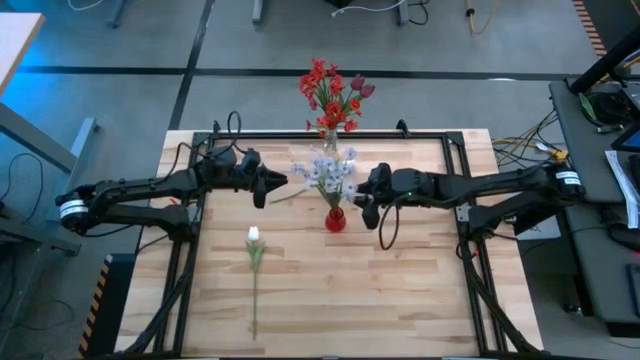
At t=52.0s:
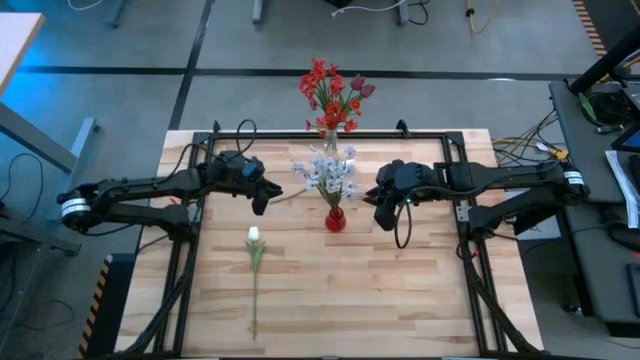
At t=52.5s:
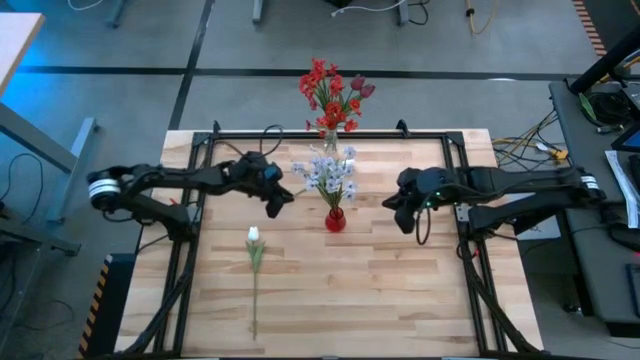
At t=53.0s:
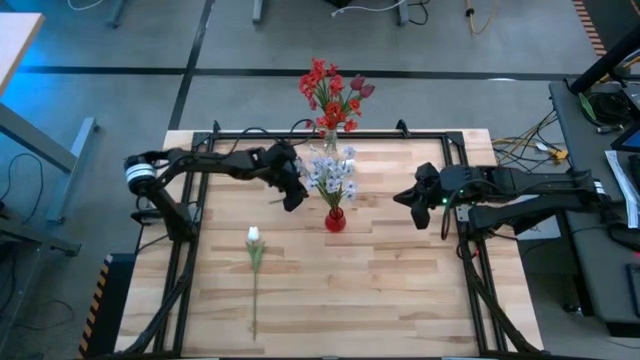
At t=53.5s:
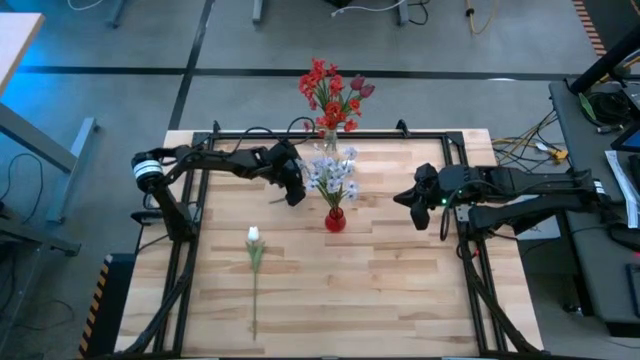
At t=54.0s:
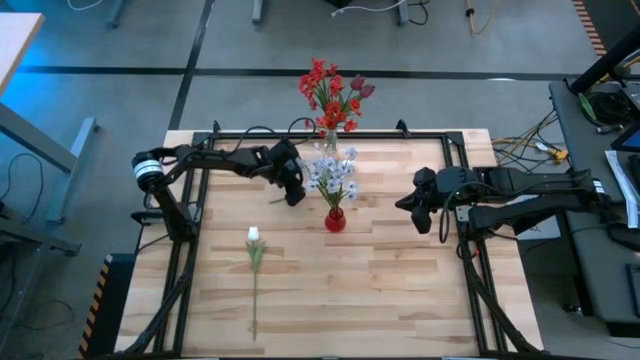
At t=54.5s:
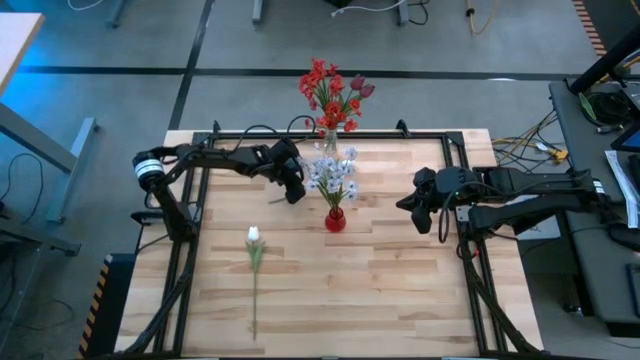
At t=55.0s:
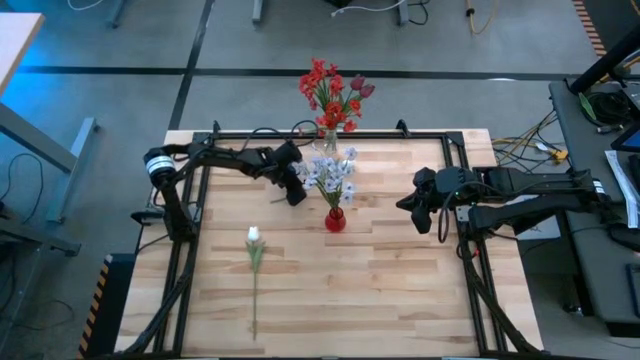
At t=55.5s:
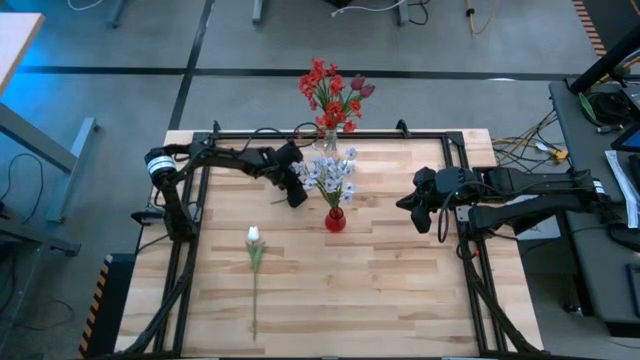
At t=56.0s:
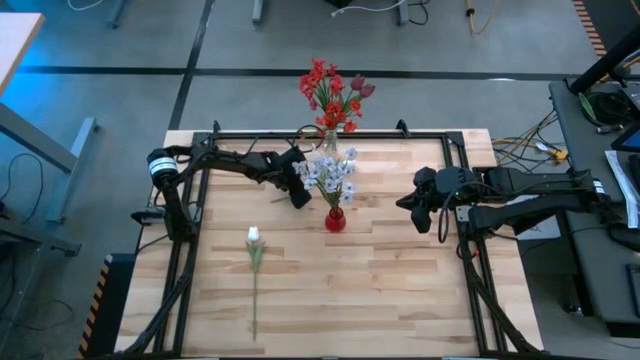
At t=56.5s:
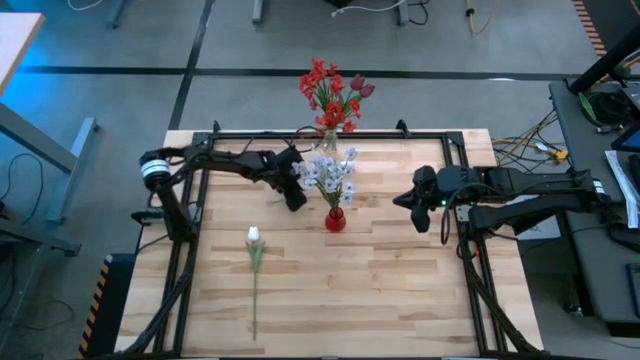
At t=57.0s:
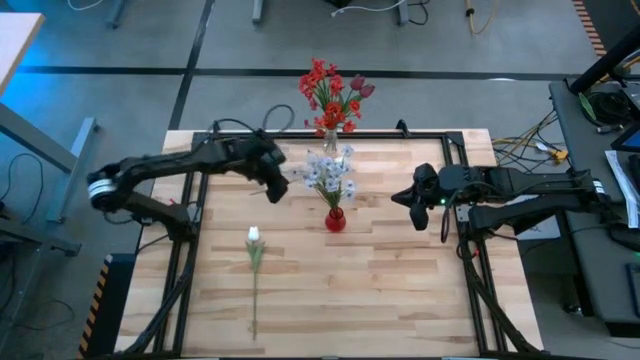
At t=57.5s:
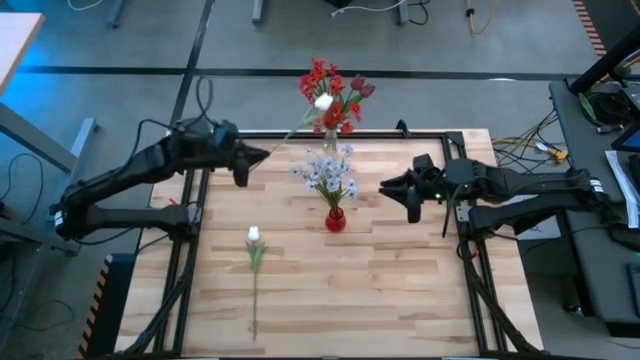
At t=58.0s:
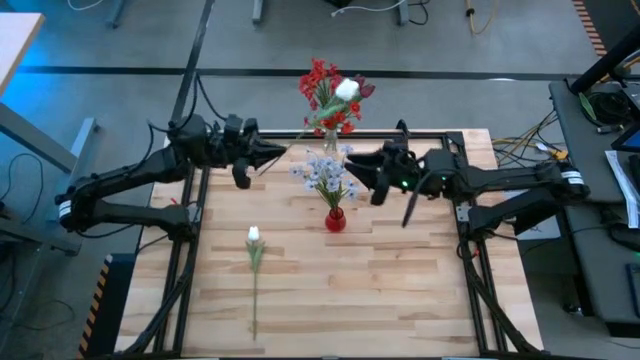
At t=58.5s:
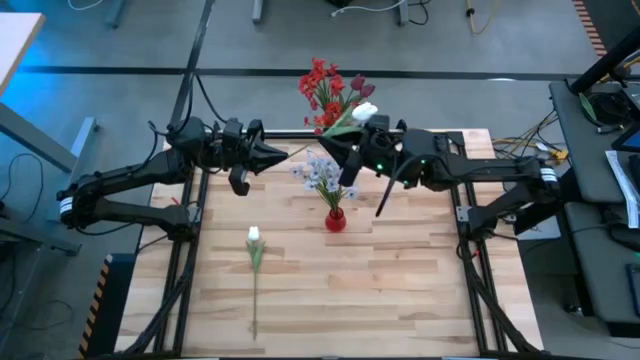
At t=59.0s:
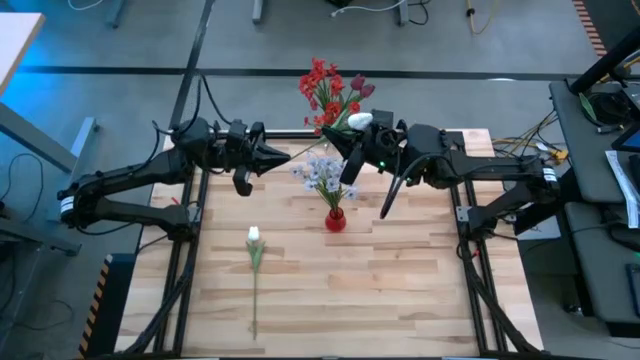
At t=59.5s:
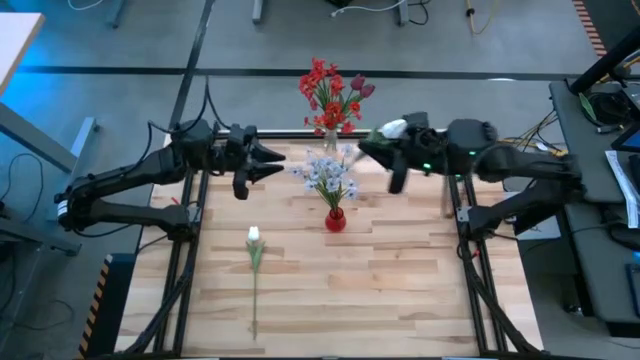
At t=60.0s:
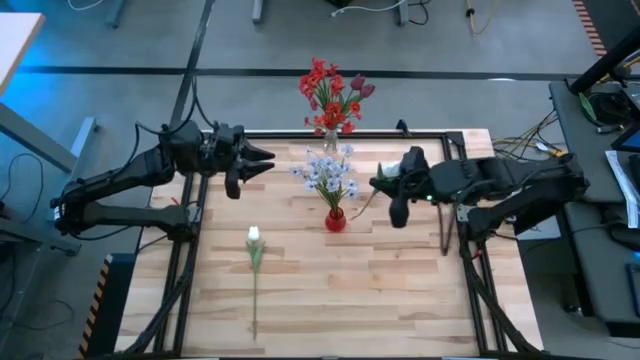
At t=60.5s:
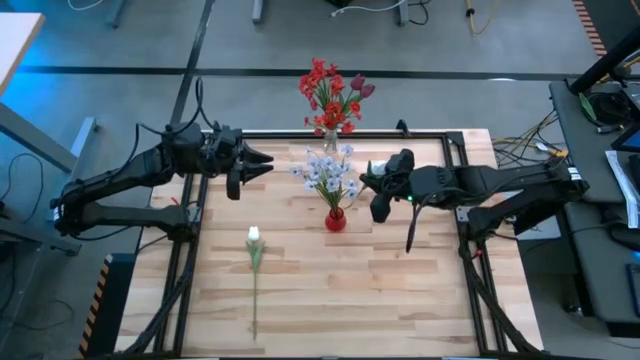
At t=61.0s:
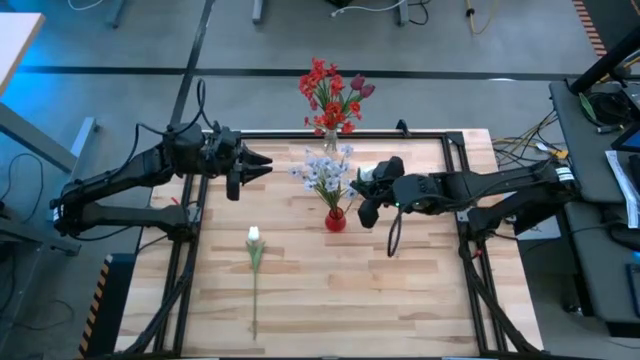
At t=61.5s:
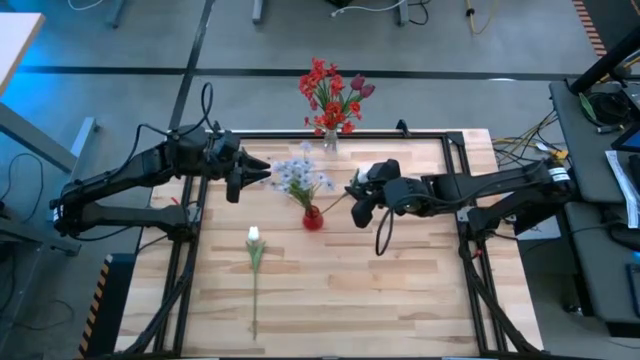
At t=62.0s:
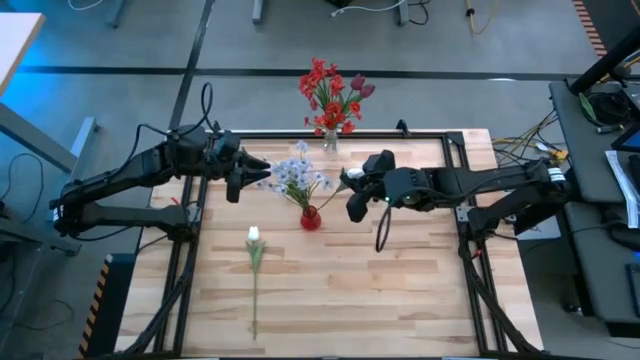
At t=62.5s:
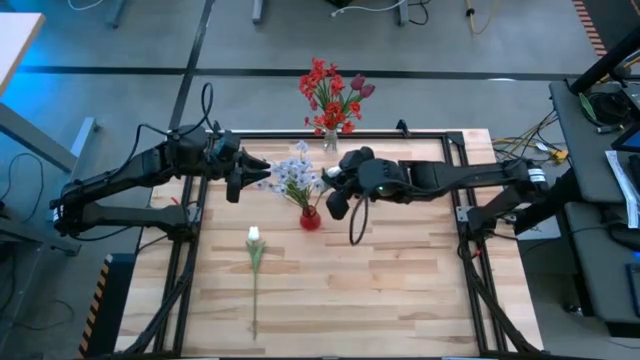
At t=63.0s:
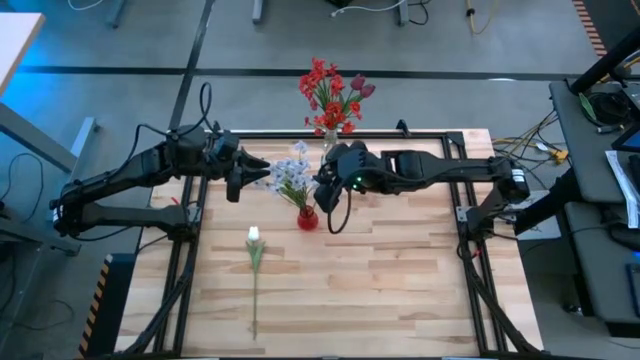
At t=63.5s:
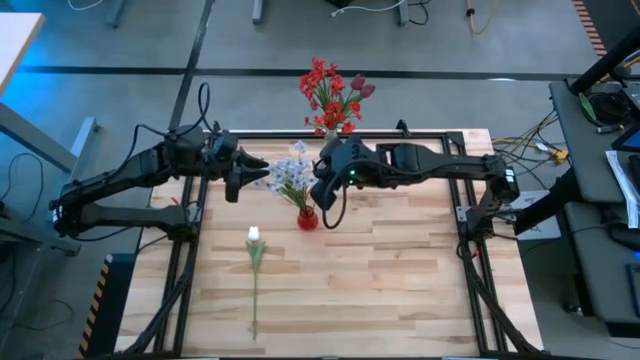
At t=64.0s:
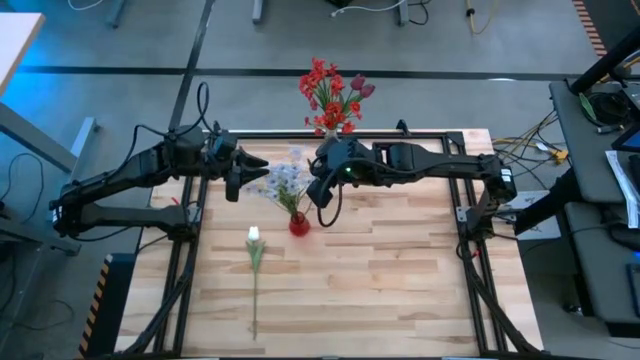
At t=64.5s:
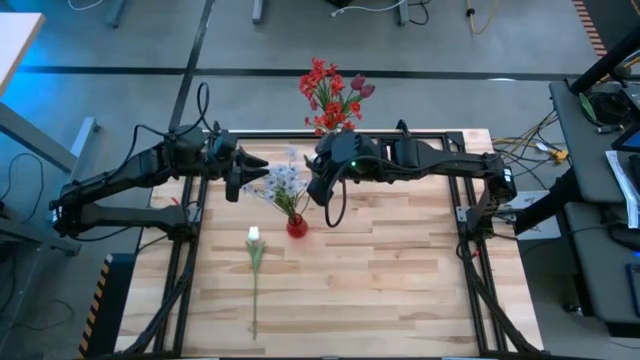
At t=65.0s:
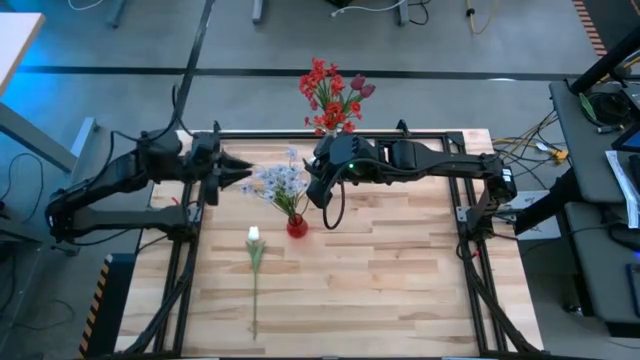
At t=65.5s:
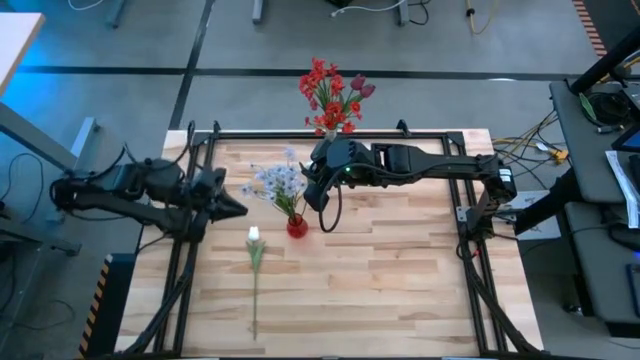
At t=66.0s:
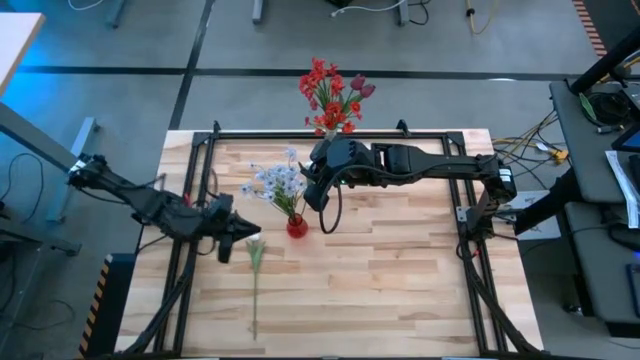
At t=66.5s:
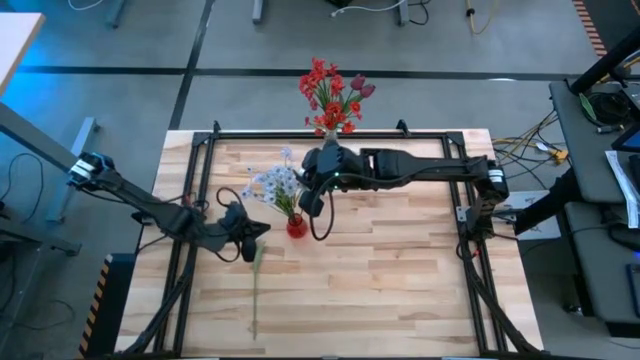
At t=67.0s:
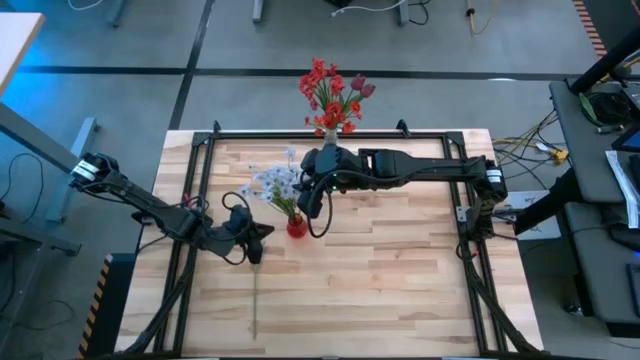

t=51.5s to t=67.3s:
Task: Sort flowers into vase by color
Put the top white tulip into the red vase

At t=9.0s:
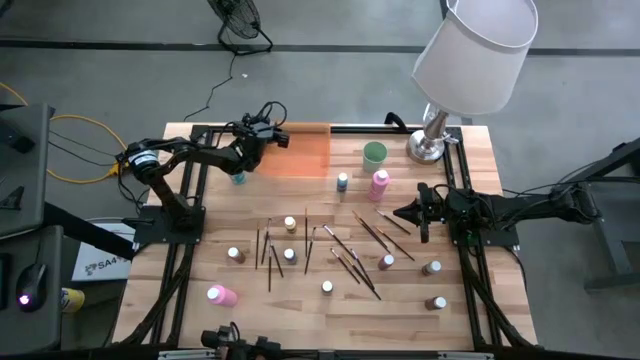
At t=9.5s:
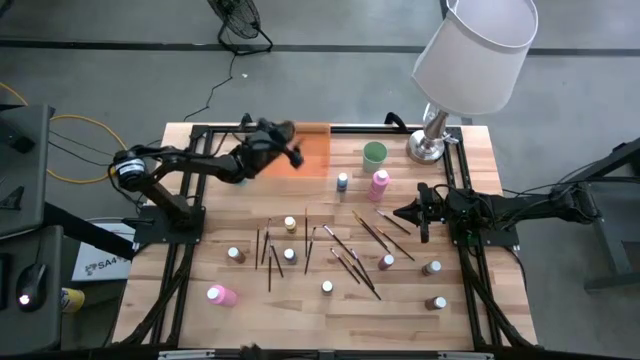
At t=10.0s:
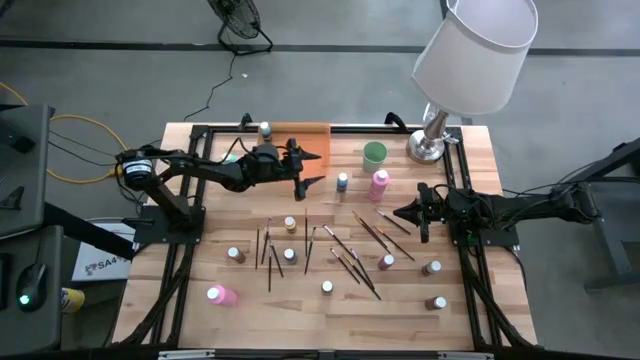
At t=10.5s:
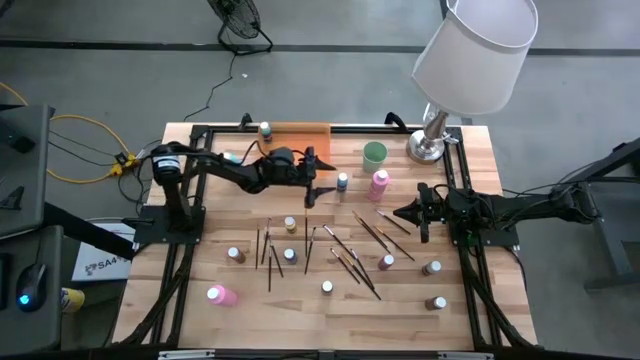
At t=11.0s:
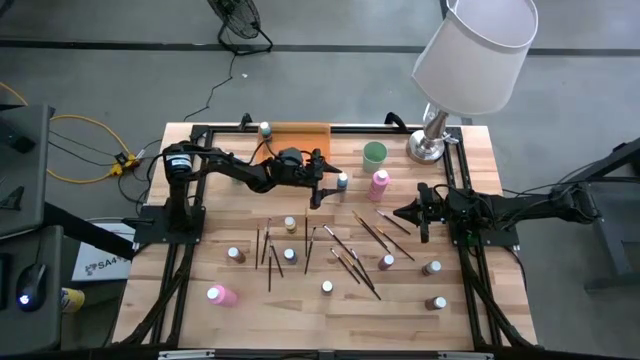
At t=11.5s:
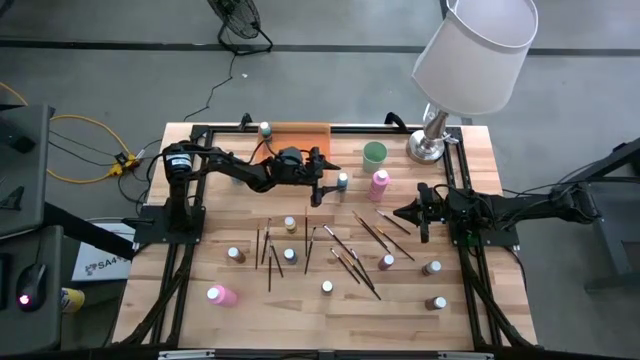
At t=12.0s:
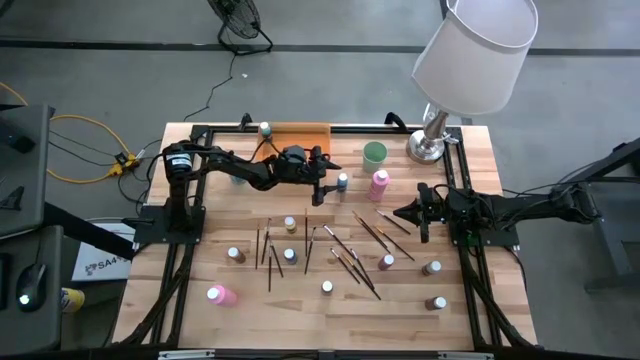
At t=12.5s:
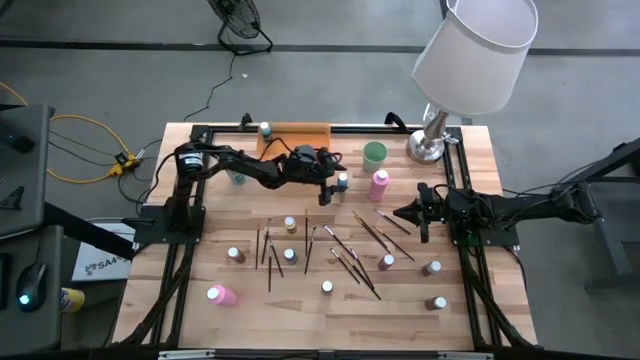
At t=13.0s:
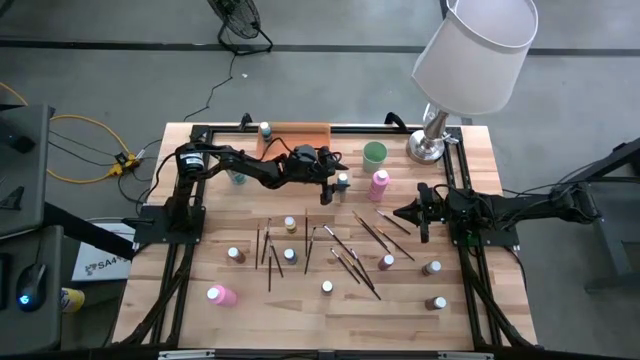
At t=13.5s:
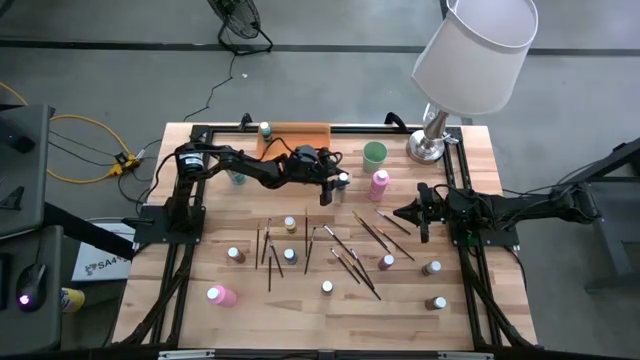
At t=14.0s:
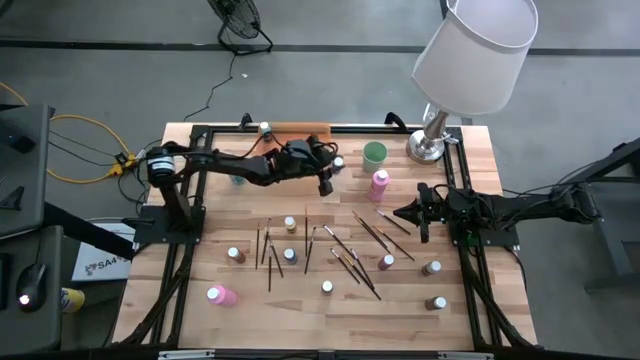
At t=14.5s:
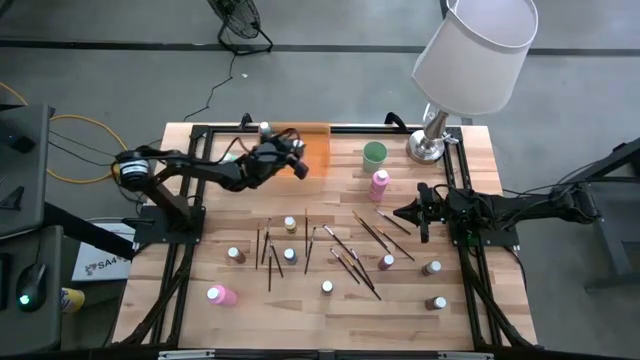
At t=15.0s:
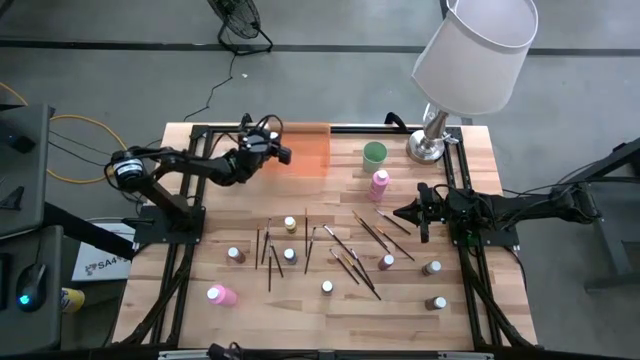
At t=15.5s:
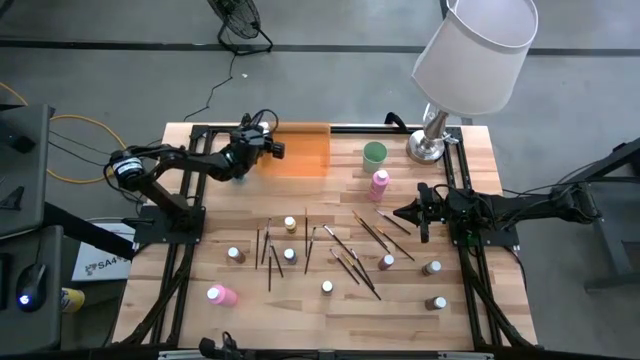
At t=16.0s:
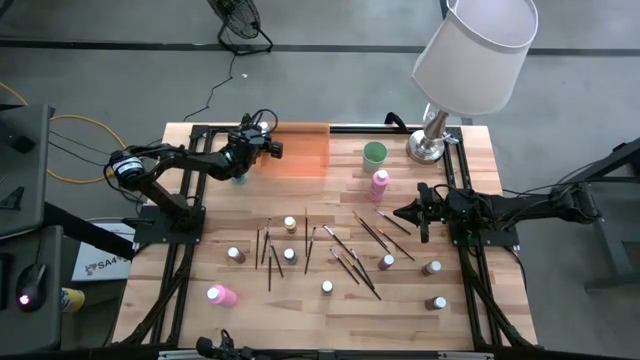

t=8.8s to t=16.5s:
Task: Pick & Place Paint Supplies
Put the small light blue paint bottle into the orange bin
